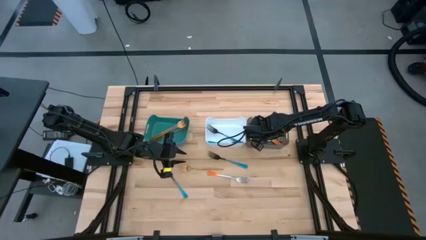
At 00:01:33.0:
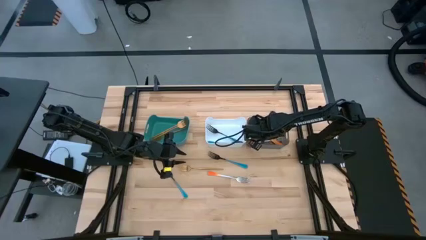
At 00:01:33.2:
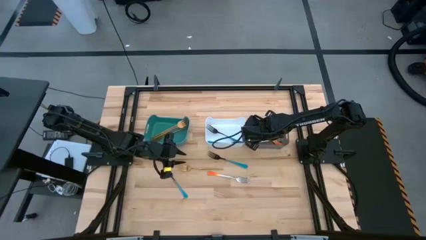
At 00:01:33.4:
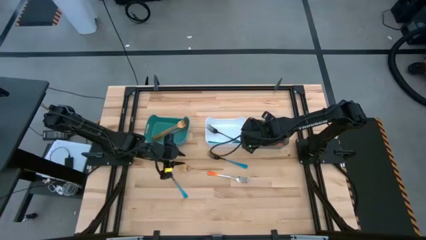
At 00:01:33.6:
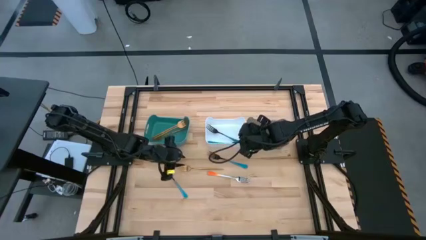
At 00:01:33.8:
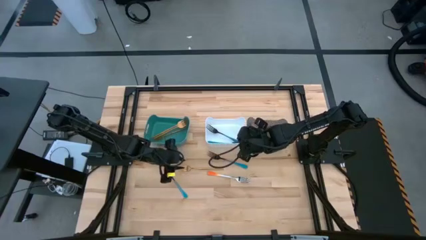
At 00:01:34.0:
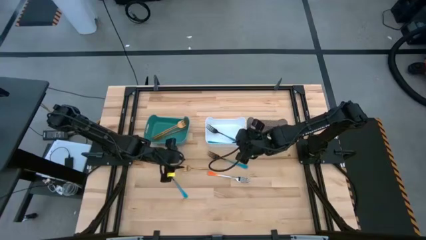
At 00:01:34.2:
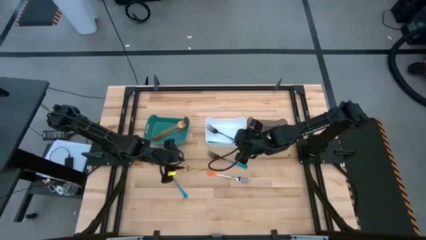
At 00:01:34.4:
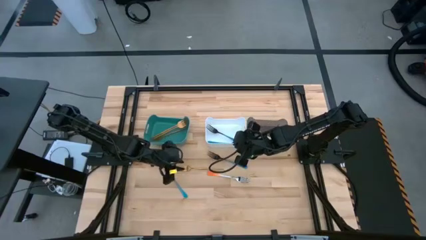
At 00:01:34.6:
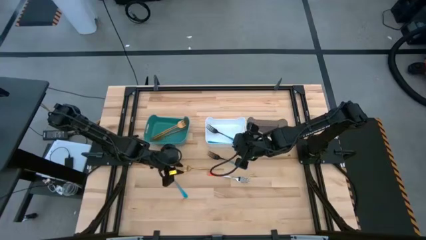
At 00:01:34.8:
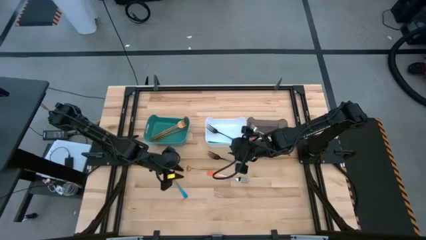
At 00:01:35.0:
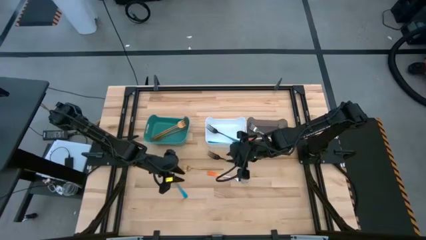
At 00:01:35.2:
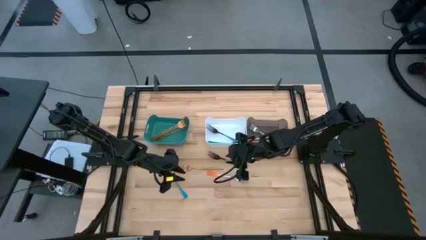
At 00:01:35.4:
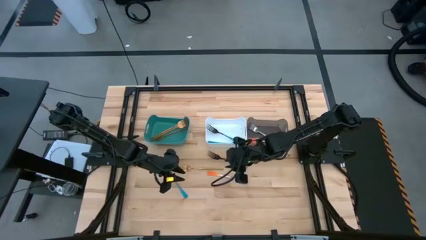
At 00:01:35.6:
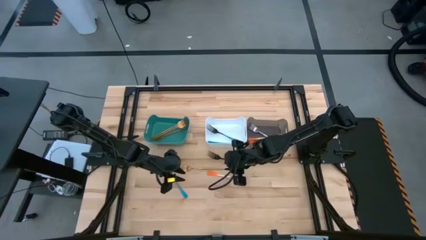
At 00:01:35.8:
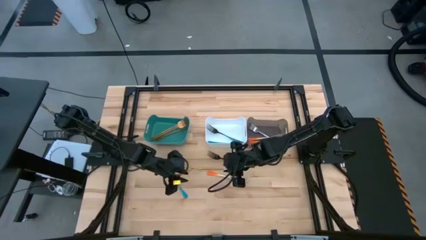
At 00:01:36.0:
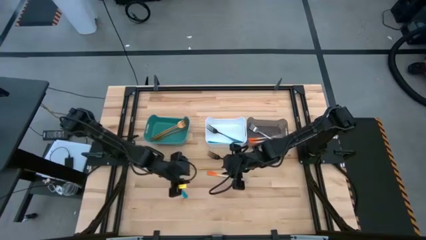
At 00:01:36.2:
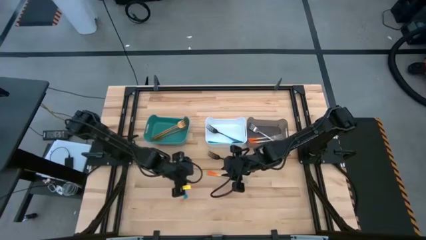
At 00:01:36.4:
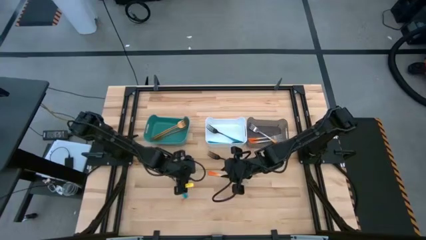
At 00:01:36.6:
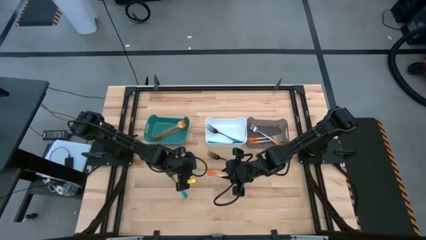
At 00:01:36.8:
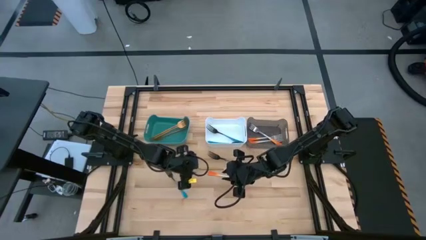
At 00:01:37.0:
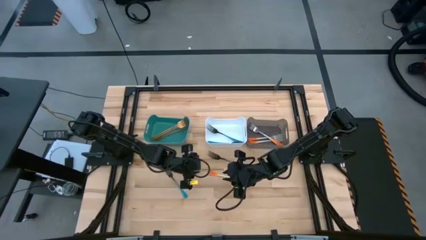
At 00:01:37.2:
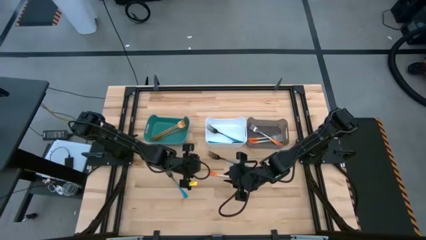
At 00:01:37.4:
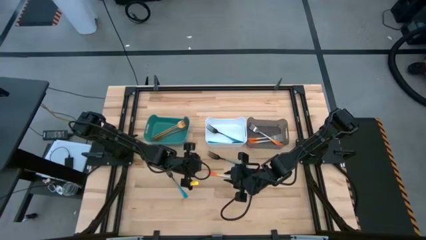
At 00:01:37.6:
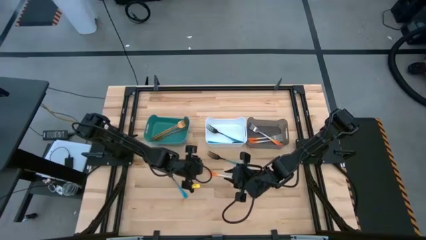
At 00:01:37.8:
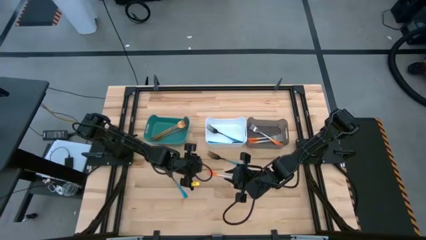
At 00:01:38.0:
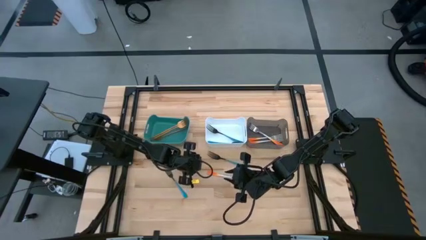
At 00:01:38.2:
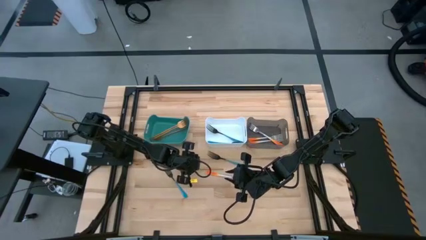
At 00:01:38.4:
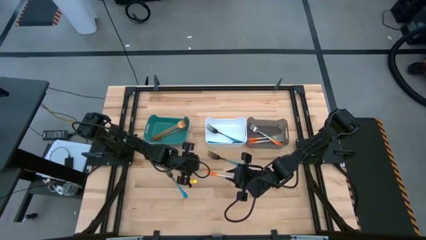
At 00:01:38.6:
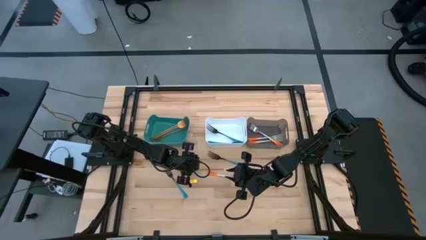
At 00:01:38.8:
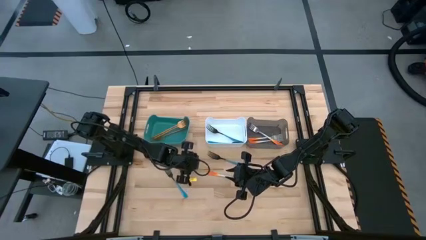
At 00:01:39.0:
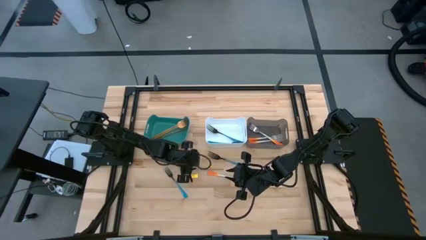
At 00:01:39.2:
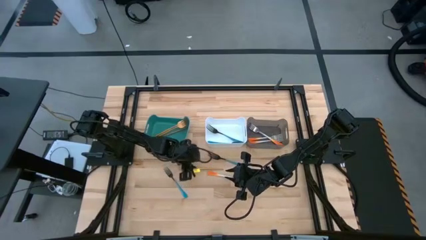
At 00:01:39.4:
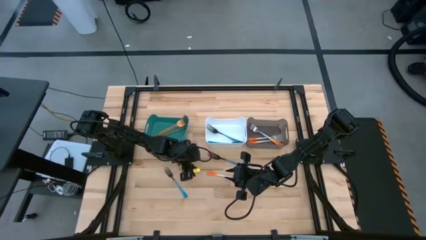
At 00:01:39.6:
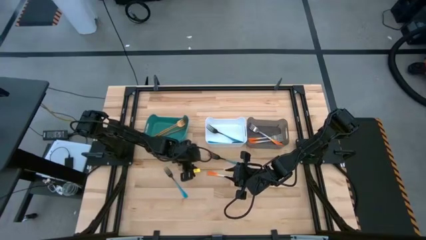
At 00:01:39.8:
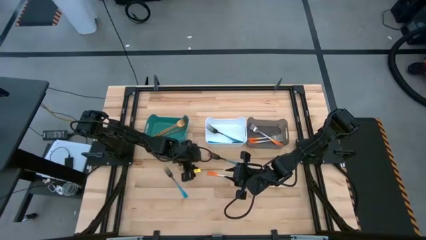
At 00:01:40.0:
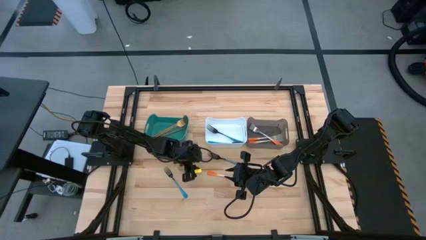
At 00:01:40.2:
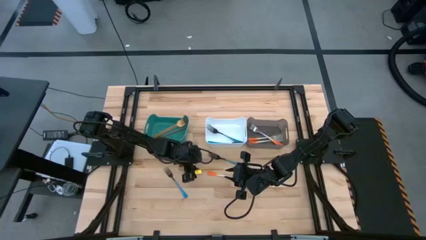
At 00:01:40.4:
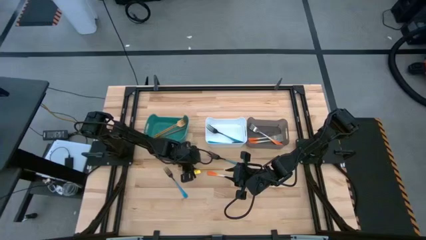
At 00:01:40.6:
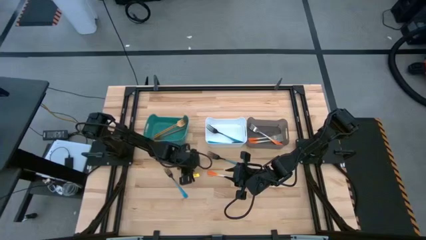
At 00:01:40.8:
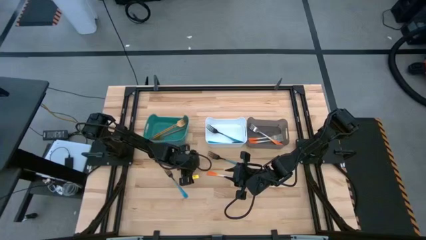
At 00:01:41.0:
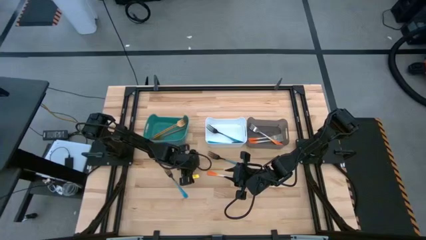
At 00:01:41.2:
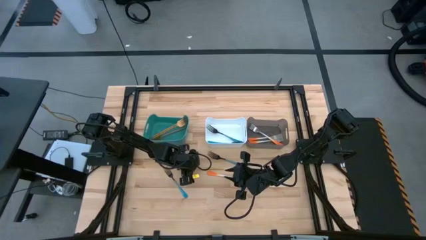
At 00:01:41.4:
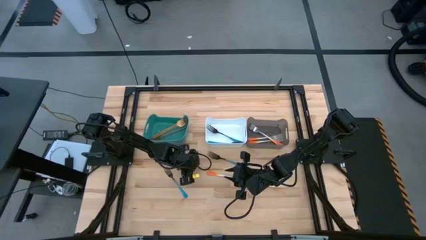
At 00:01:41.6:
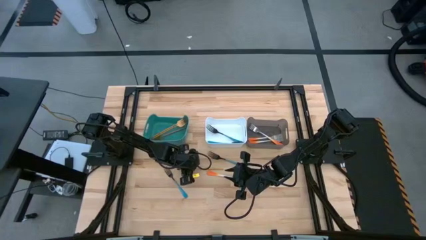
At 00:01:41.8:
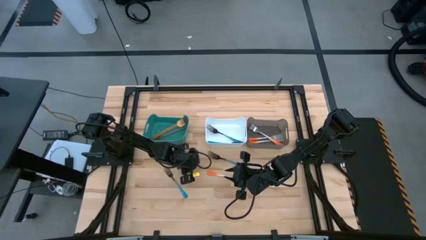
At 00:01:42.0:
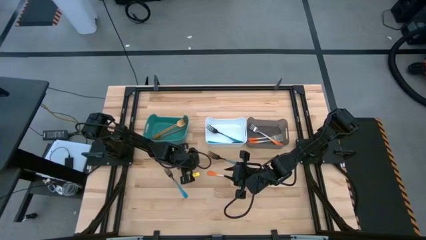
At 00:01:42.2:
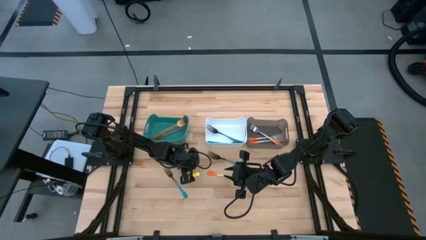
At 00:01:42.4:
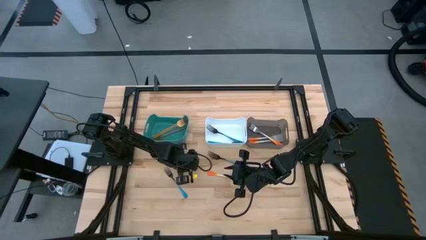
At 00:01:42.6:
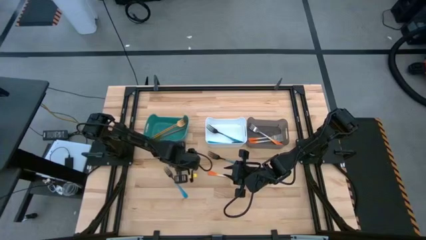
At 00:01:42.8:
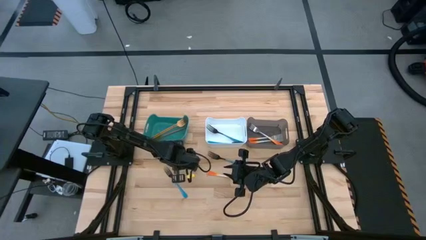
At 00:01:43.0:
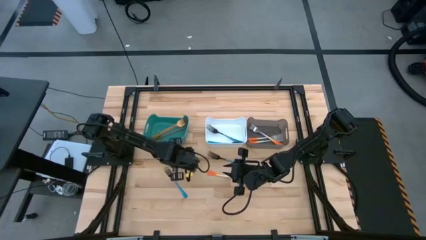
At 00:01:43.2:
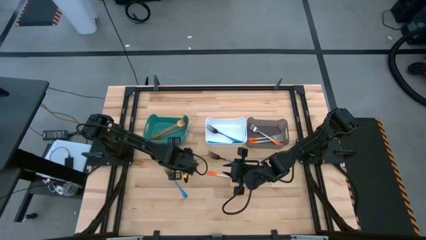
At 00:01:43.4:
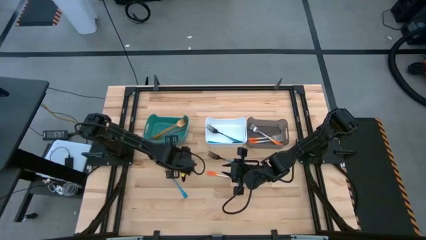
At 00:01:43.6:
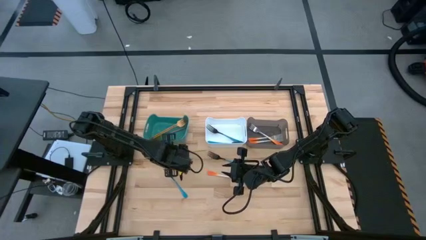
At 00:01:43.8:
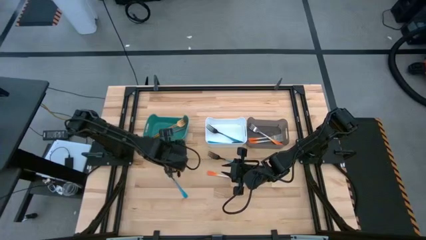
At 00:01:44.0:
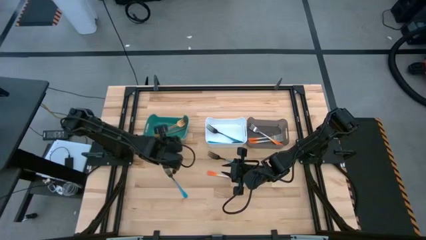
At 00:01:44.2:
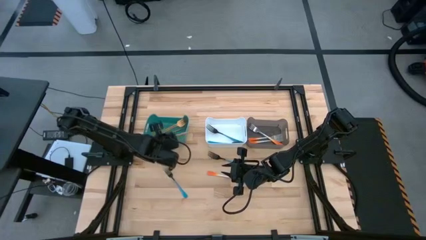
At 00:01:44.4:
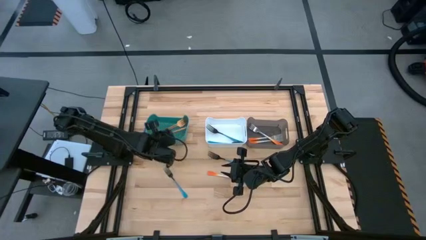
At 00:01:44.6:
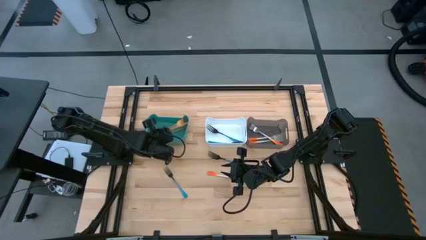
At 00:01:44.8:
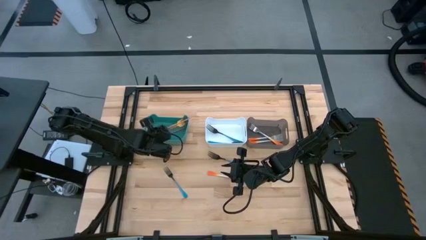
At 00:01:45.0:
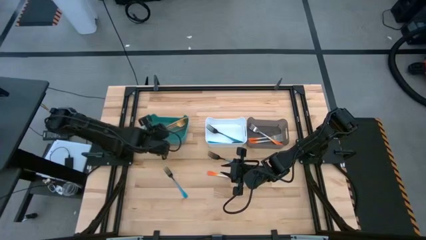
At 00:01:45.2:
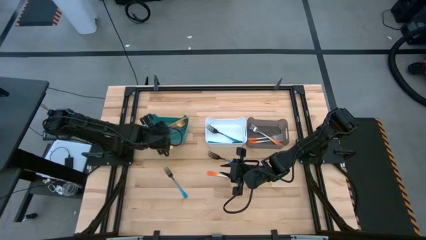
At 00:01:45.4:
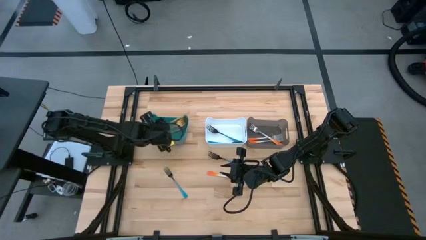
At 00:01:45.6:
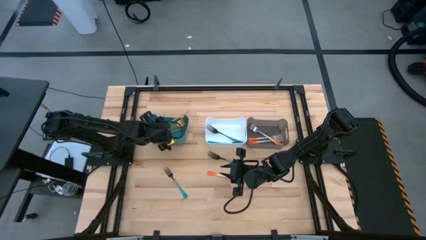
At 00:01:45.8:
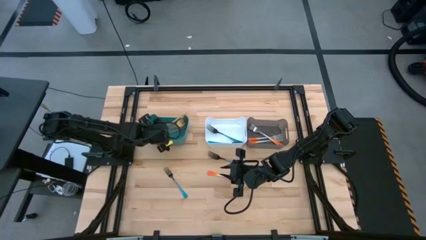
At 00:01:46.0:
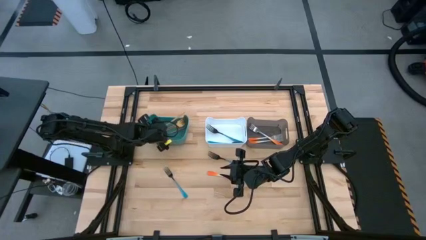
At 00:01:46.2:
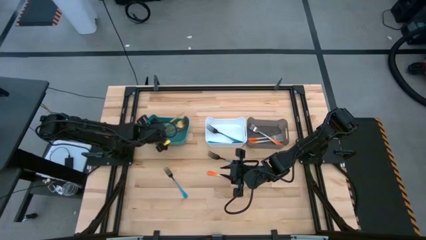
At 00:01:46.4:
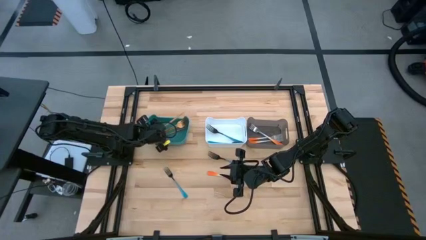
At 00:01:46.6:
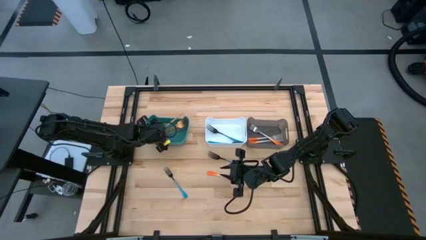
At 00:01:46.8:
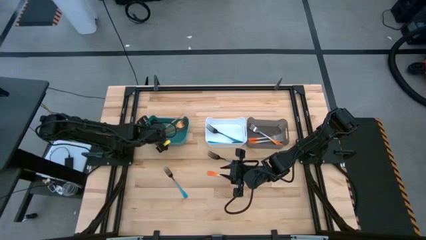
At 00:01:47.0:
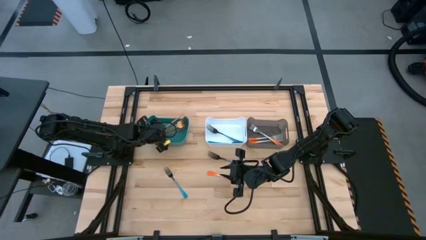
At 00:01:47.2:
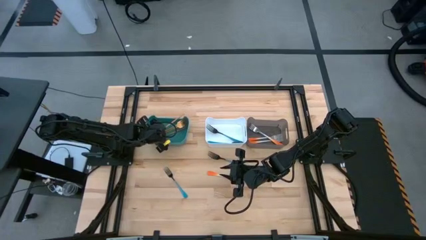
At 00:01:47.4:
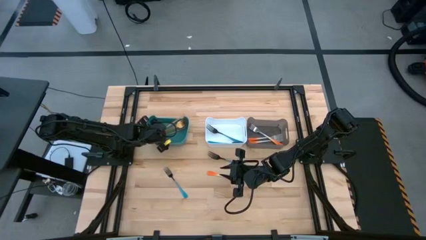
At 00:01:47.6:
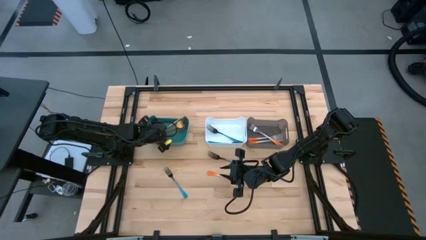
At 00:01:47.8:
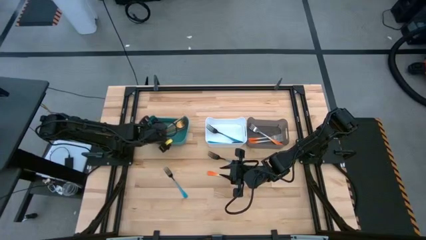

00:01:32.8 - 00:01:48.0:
Task: Sort silverware by color (type)
Put the gold fork into the green bin
